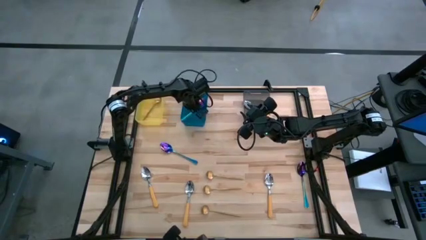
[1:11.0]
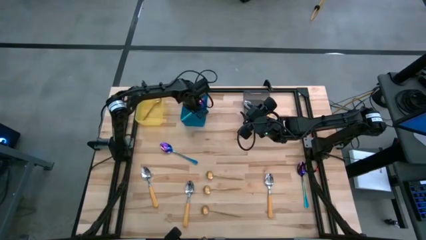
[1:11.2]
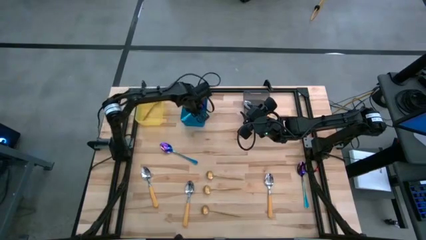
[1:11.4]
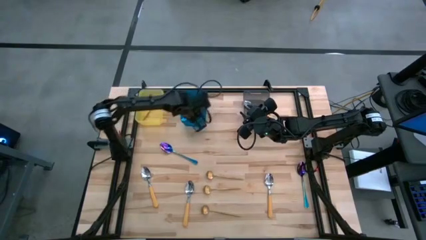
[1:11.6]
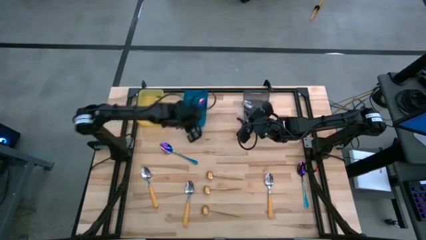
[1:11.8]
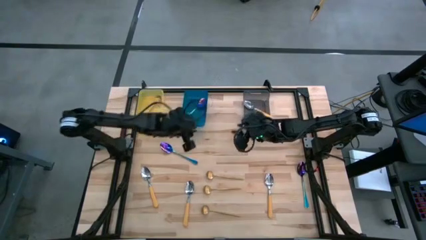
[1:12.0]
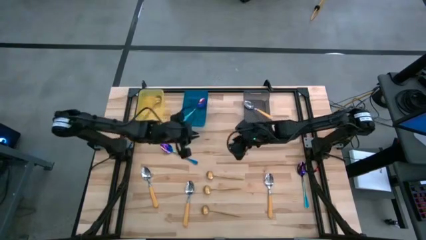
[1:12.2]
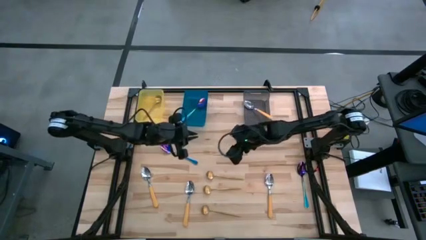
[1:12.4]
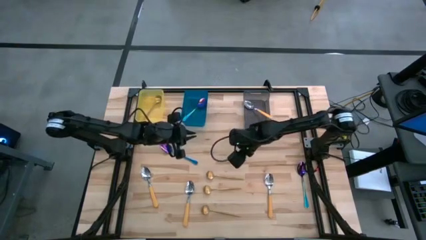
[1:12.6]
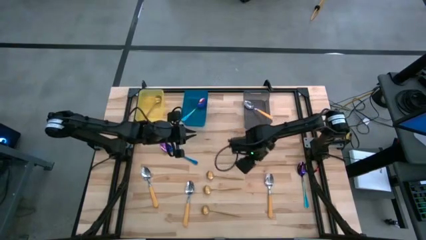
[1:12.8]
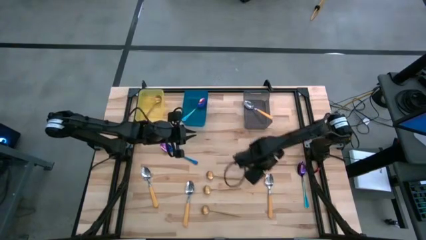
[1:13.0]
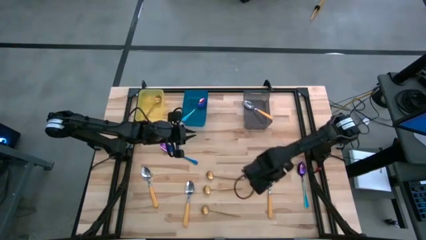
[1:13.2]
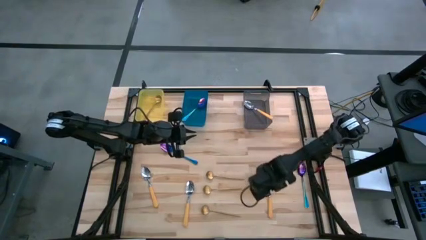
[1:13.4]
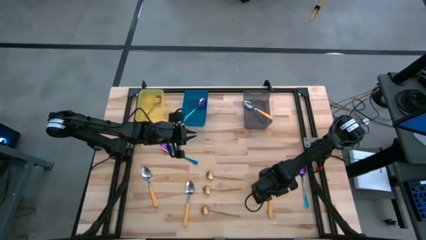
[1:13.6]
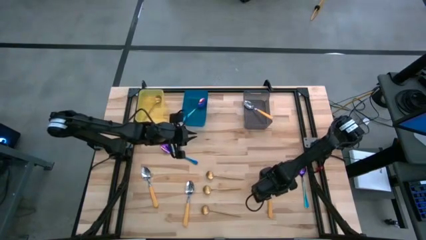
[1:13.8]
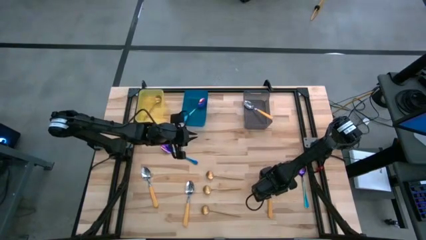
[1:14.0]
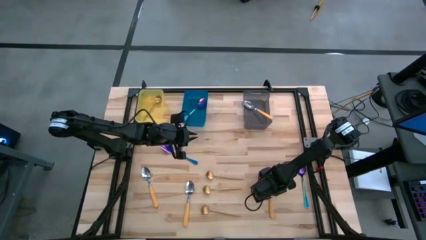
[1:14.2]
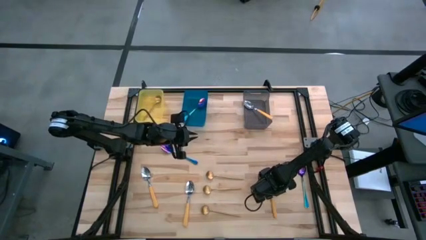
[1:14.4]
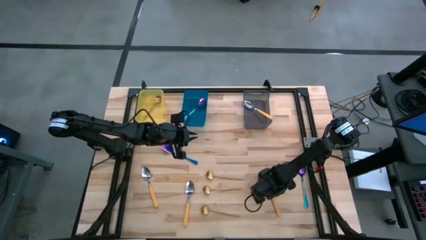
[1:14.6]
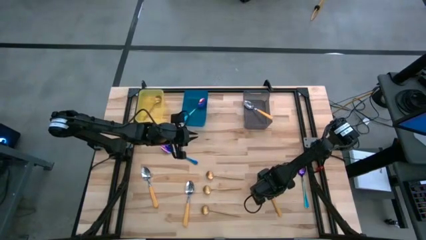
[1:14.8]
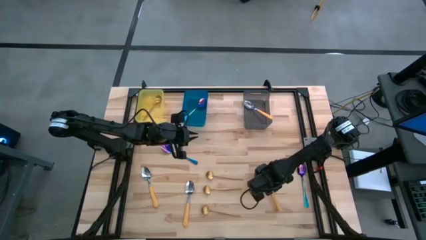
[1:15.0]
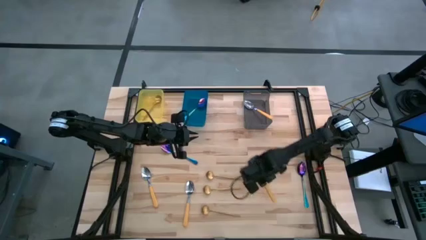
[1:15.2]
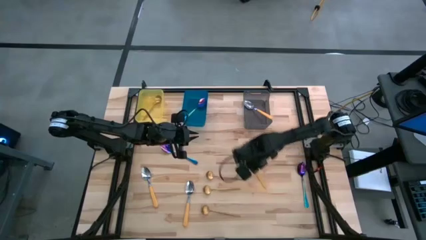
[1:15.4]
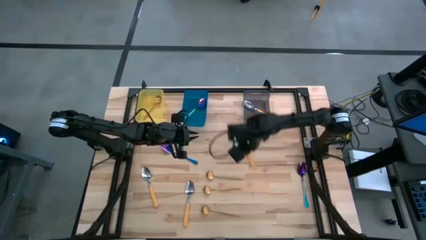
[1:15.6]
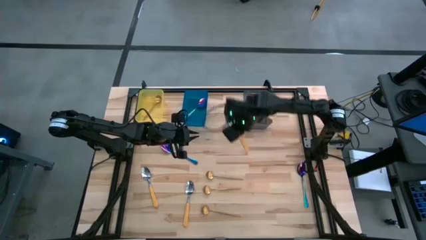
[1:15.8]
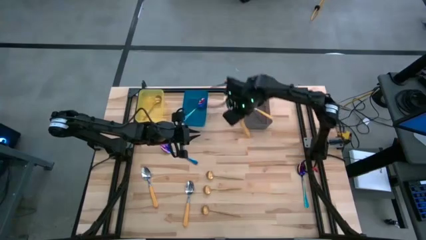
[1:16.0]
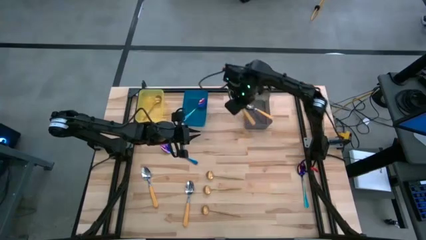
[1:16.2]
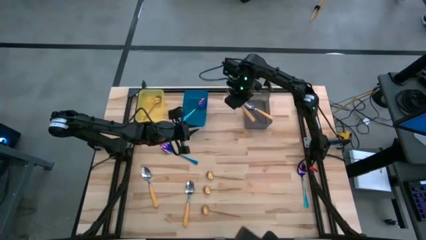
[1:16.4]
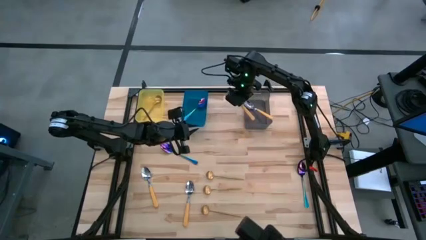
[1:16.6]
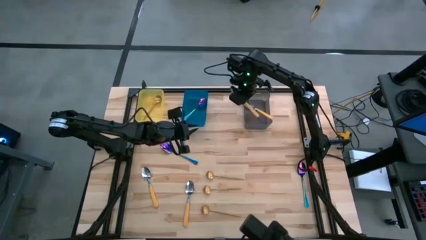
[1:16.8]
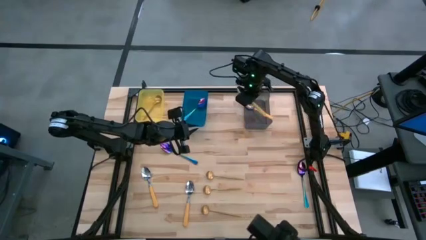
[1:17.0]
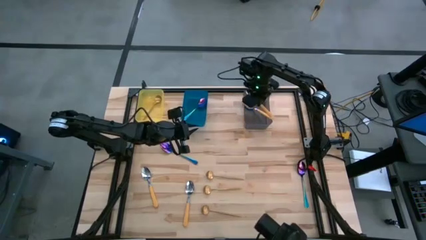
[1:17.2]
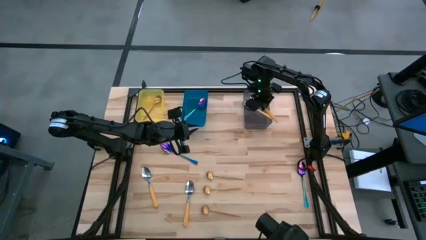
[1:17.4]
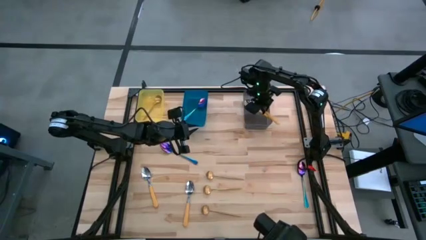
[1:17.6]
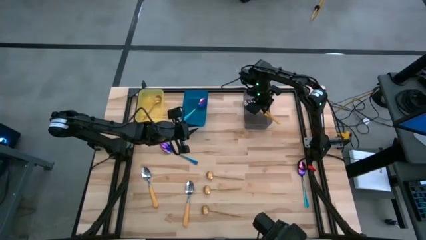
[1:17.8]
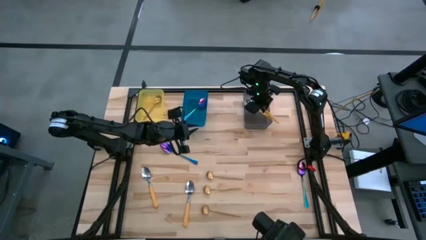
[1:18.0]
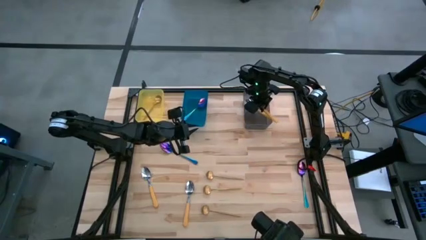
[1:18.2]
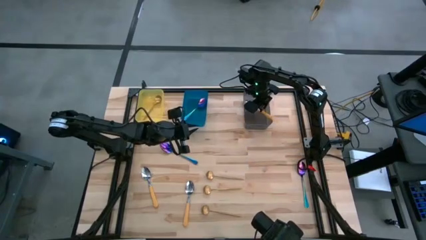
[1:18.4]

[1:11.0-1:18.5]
Task: Sort silverware by color (type)
Put the yellow spoon into the black bin

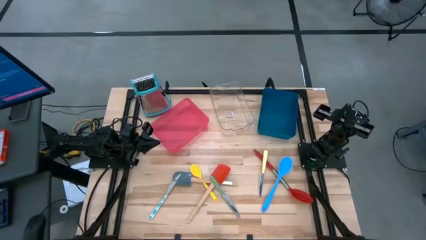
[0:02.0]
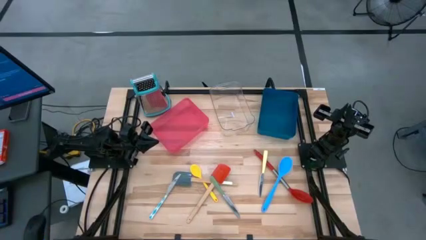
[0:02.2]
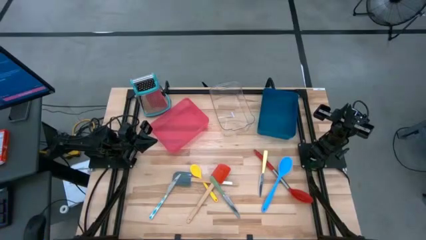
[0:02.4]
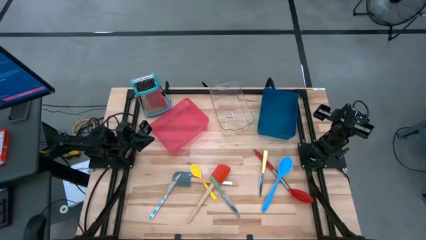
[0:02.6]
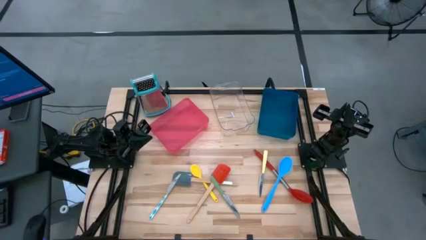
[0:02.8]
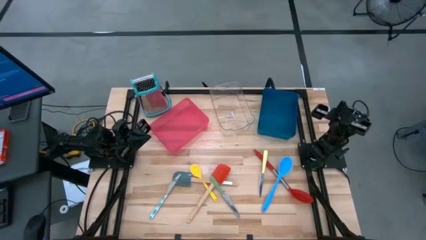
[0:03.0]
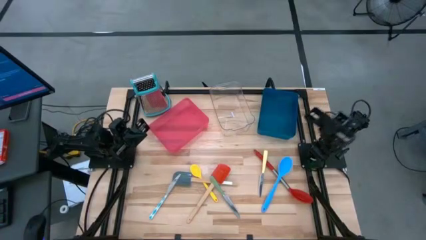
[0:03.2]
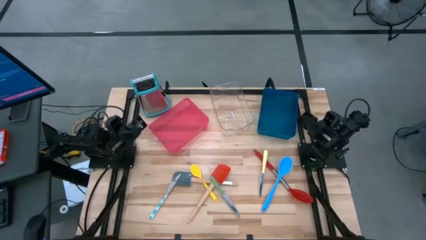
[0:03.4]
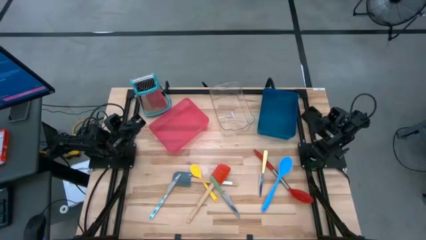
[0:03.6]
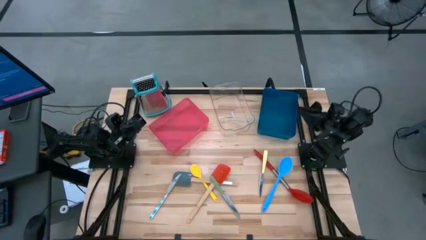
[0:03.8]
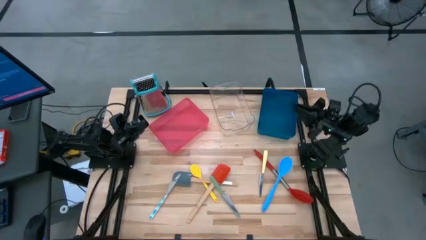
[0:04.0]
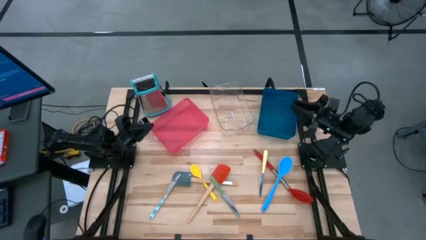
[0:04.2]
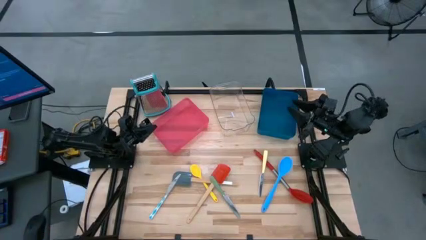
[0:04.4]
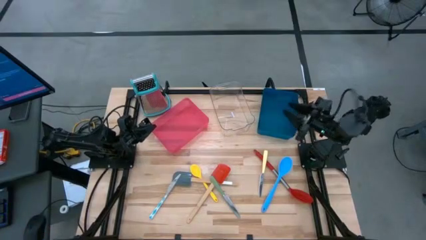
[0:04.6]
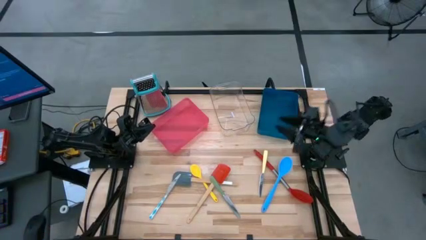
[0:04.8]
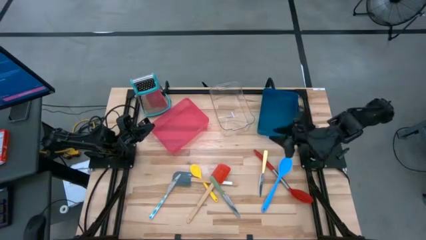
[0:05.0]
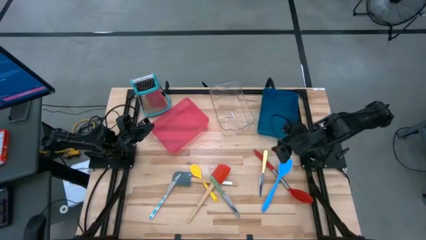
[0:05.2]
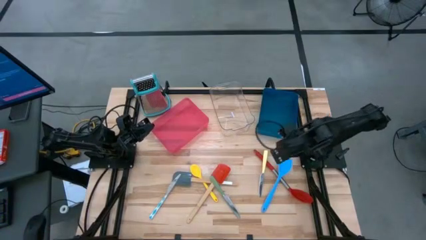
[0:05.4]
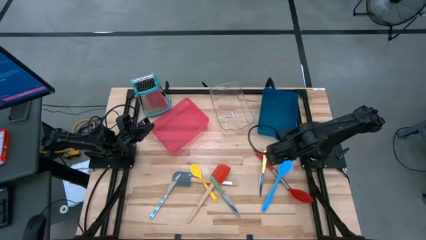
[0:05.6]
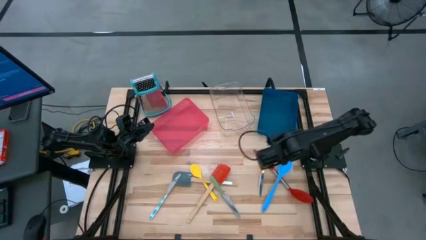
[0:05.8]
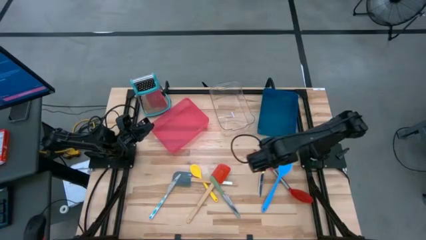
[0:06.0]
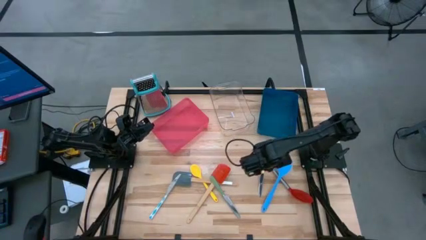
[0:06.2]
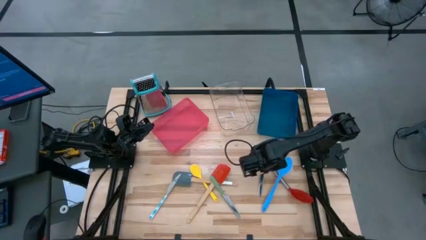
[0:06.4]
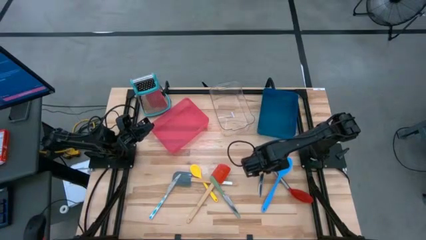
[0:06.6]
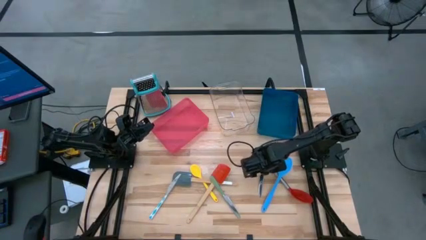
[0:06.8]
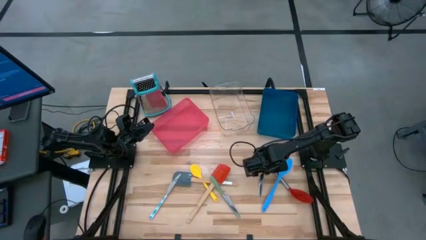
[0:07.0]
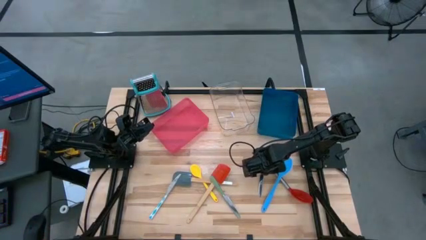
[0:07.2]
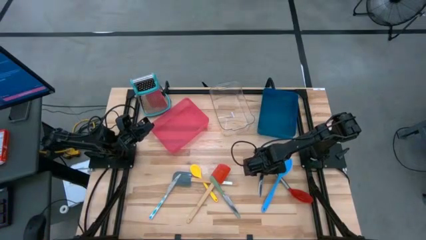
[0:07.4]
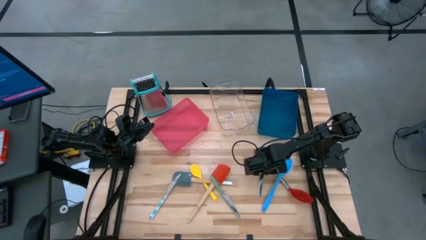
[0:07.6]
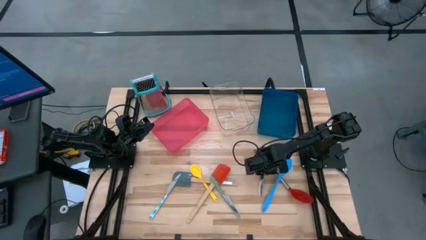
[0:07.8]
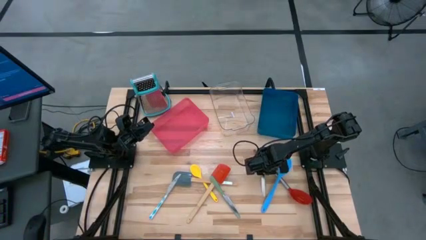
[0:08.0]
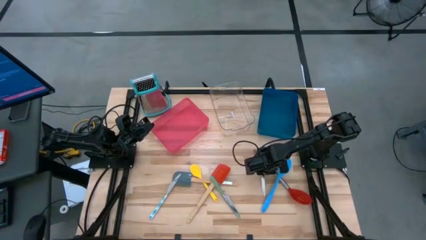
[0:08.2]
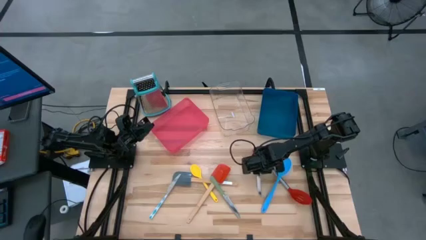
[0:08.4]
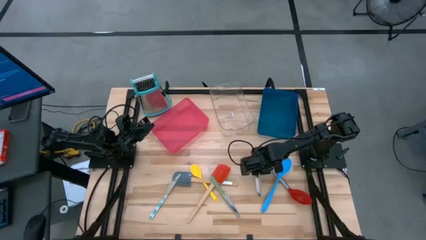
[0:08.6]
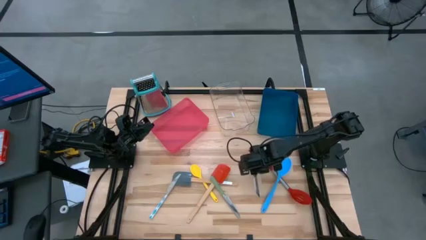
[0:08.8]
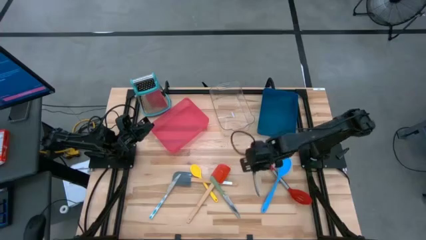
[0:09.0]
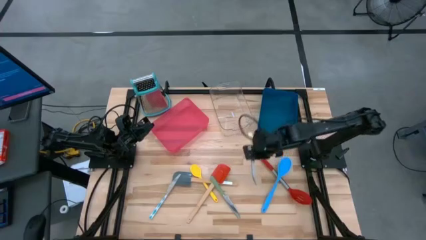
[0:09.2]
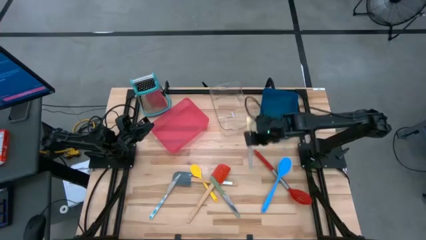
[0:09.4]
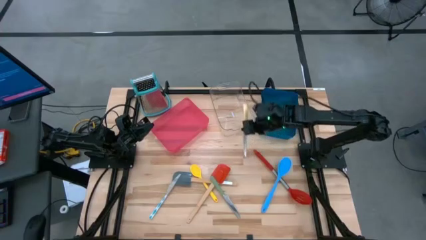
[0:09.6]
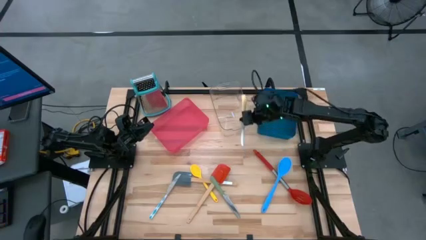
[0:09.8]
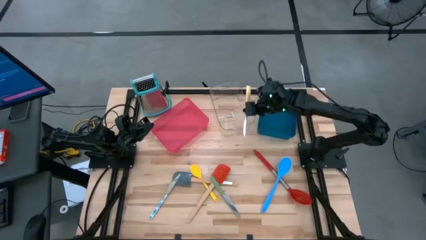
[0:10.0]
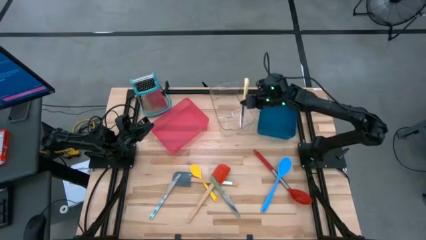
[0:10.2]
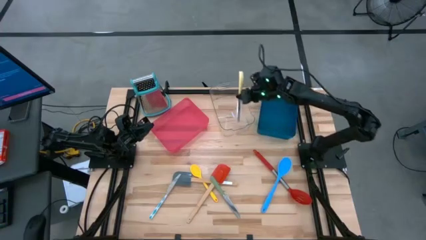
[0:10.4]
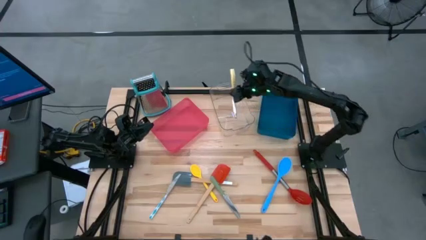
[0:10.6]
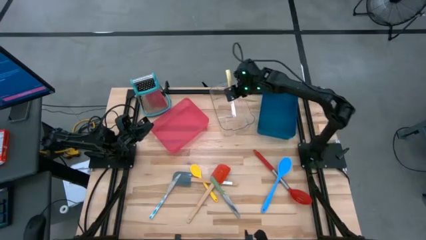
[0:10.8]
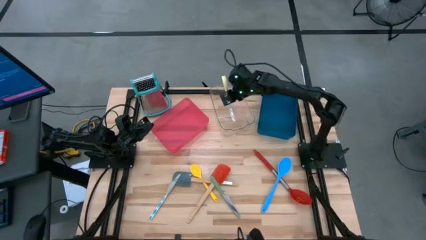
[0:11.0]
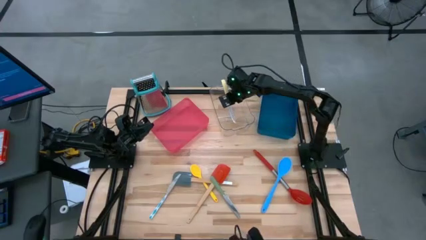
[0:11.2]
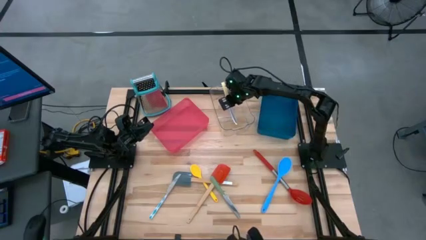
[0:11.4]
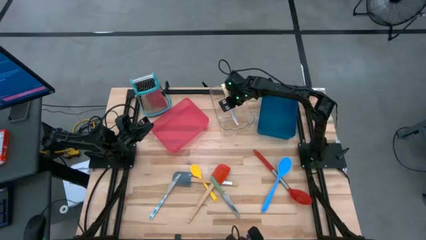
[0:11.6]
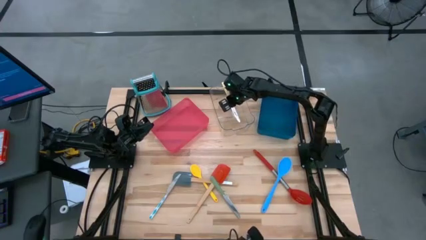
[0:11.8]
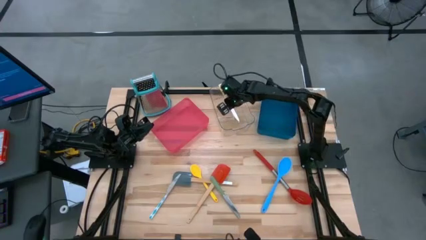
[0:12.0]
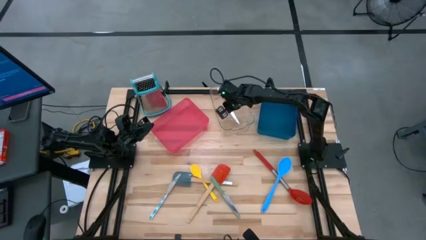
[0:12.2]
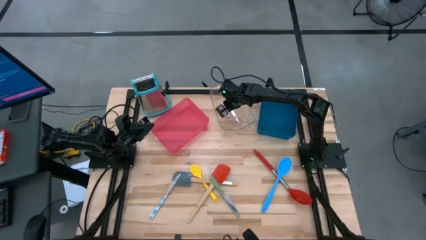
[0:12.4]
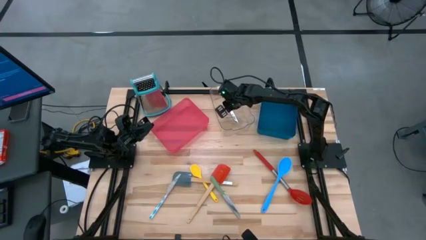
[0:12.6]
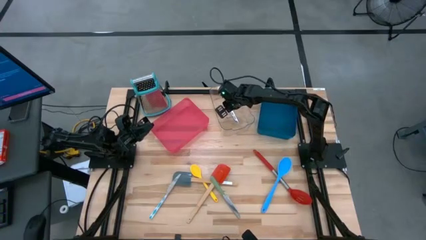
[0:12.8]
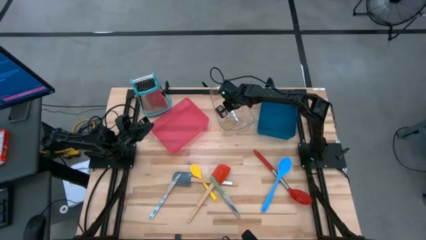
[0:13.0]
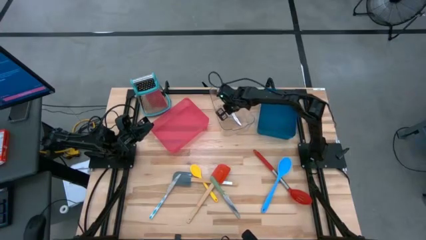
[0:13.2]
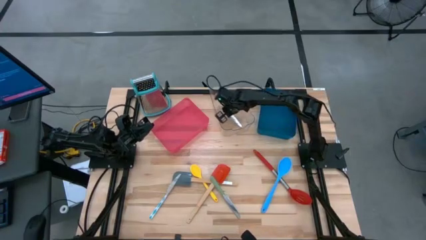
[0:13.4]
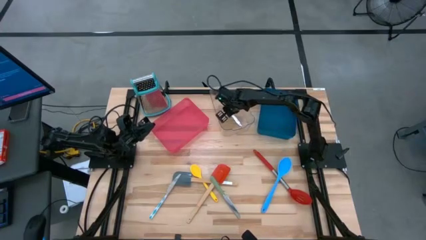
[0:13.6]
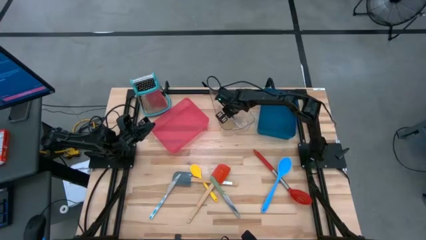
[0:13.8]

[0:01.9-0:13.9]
Task: Pick & Place Kitchen Items
Put the light yellow knife into the transparent bin
